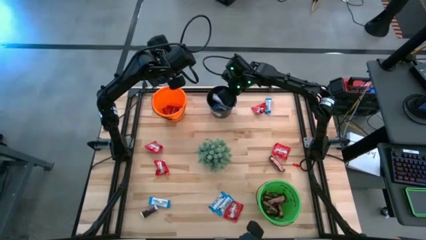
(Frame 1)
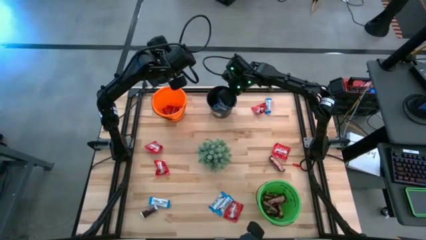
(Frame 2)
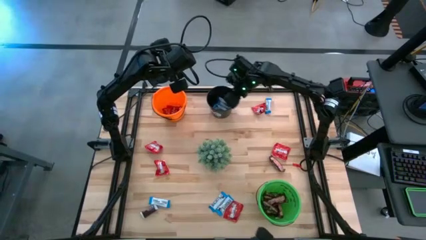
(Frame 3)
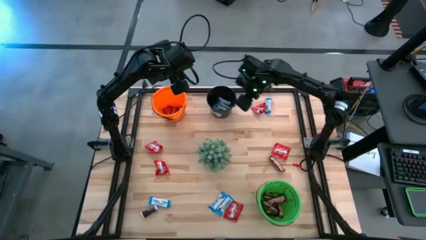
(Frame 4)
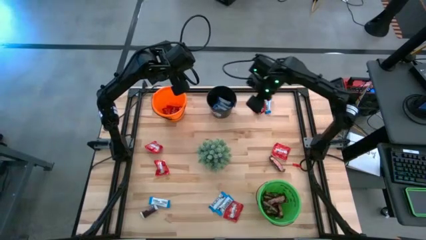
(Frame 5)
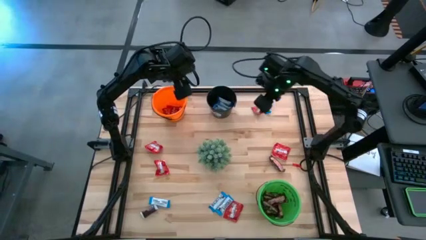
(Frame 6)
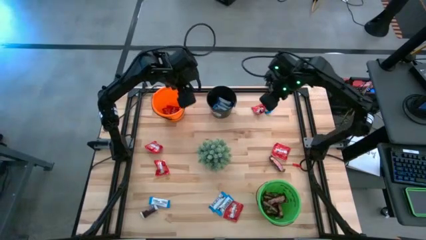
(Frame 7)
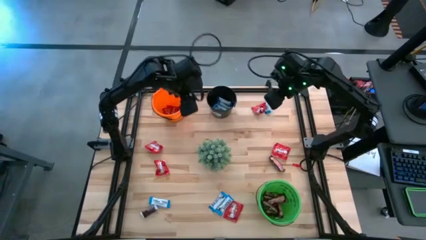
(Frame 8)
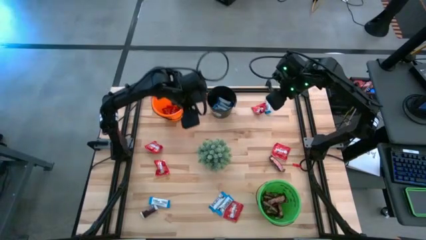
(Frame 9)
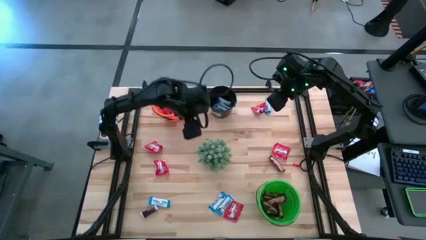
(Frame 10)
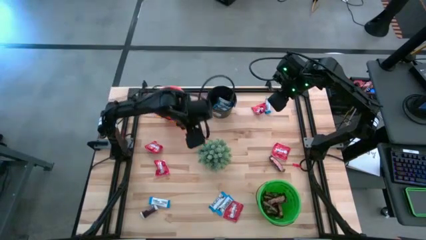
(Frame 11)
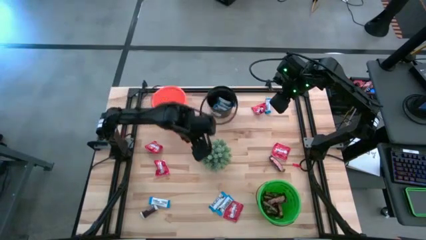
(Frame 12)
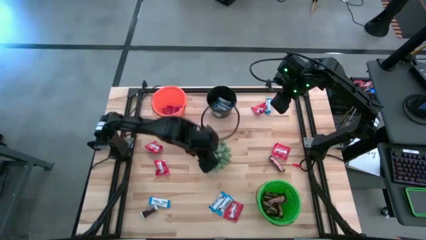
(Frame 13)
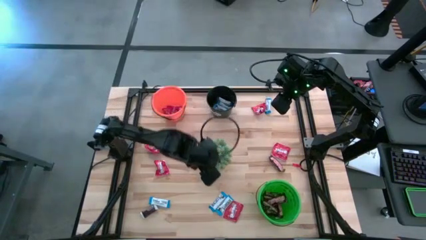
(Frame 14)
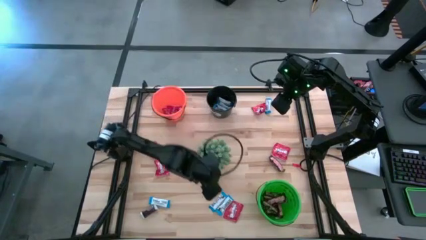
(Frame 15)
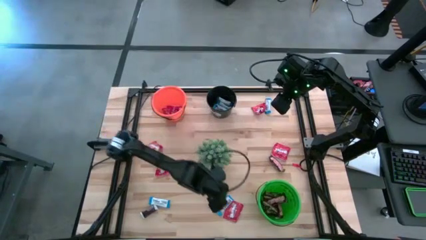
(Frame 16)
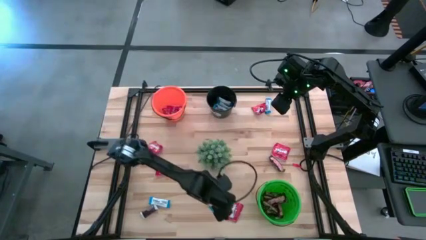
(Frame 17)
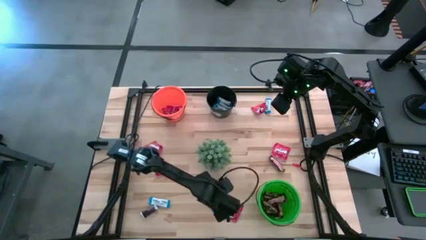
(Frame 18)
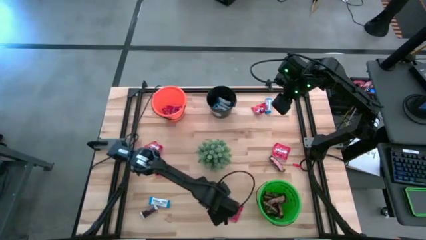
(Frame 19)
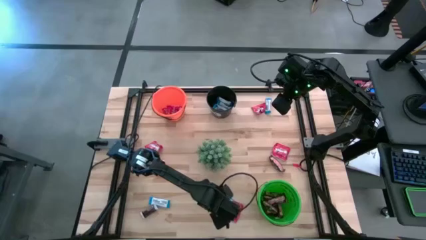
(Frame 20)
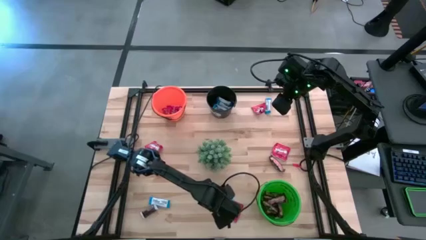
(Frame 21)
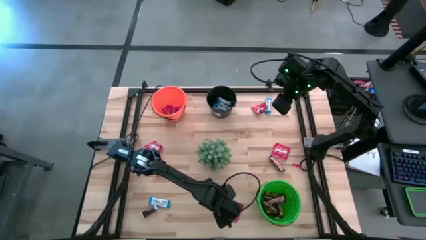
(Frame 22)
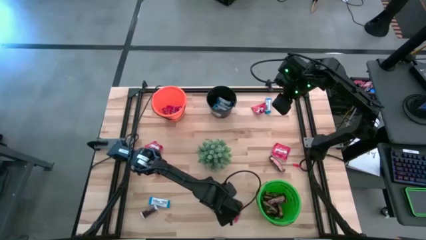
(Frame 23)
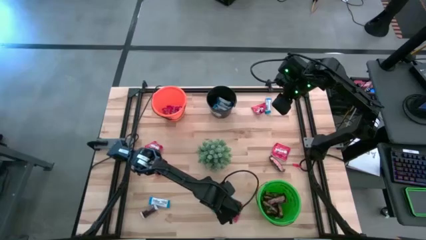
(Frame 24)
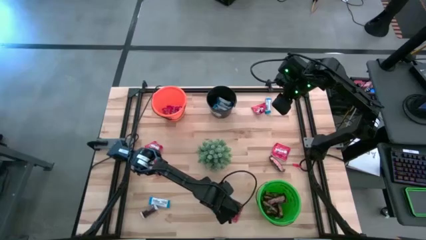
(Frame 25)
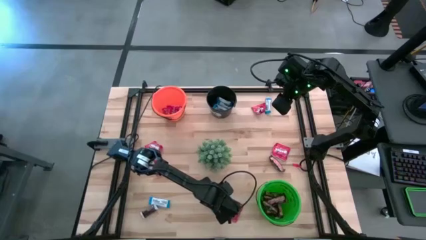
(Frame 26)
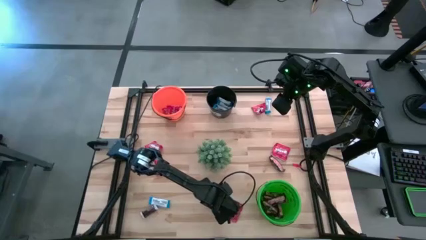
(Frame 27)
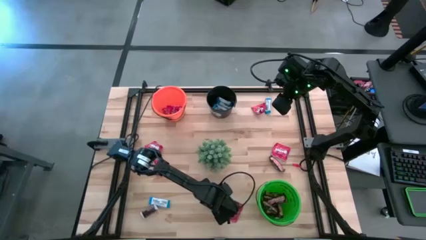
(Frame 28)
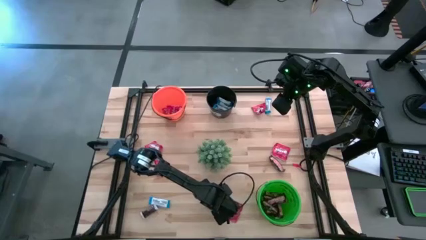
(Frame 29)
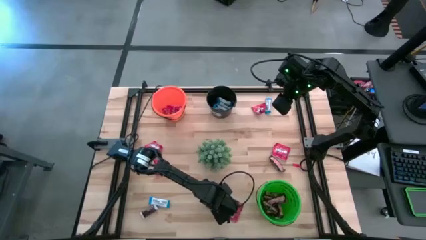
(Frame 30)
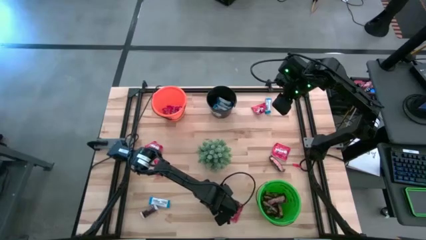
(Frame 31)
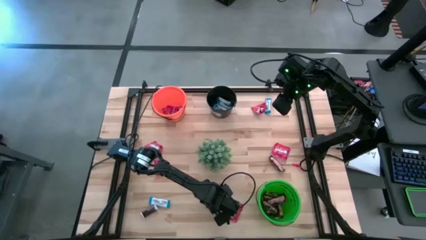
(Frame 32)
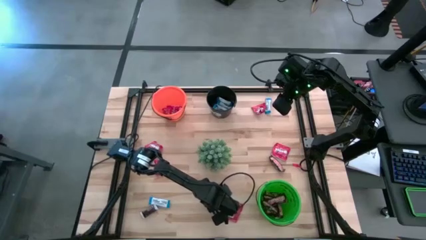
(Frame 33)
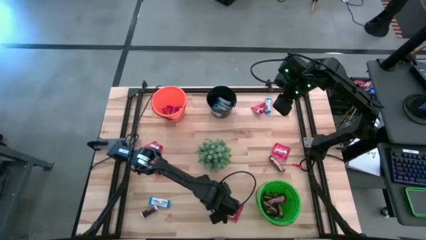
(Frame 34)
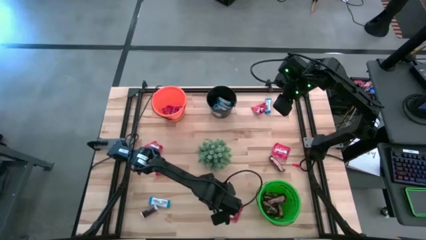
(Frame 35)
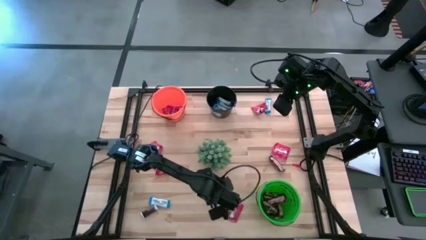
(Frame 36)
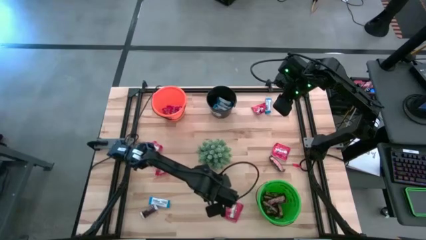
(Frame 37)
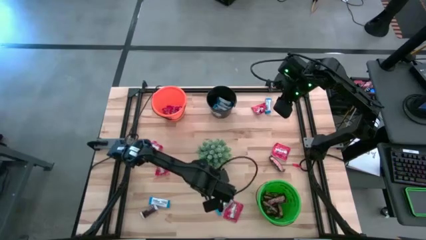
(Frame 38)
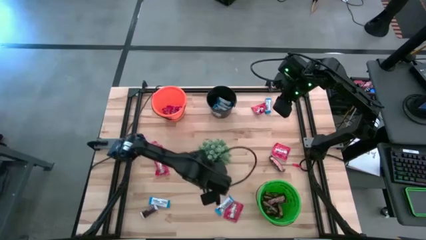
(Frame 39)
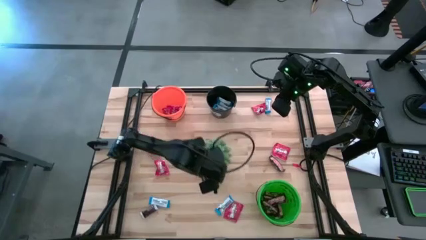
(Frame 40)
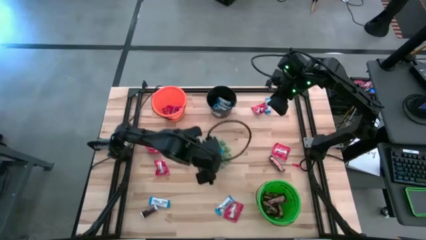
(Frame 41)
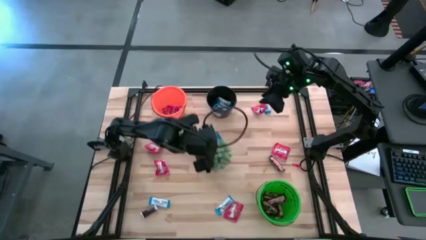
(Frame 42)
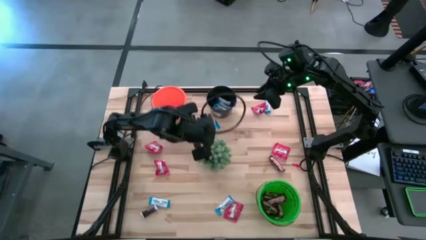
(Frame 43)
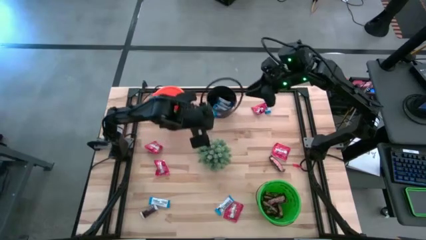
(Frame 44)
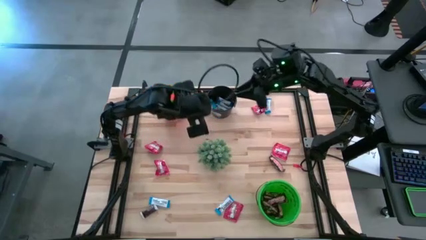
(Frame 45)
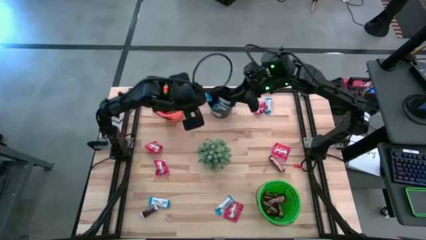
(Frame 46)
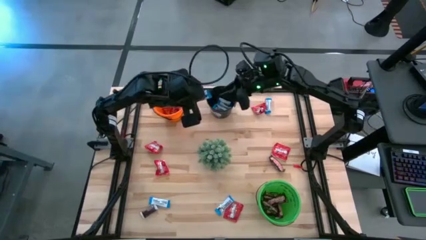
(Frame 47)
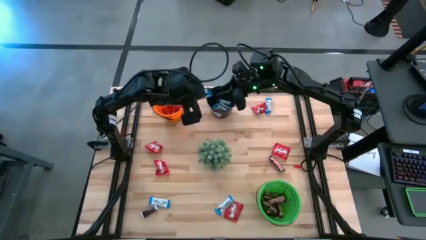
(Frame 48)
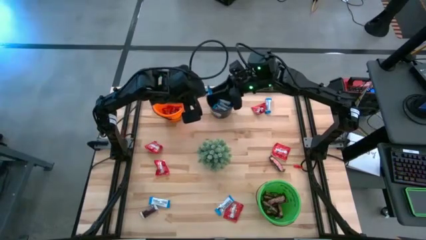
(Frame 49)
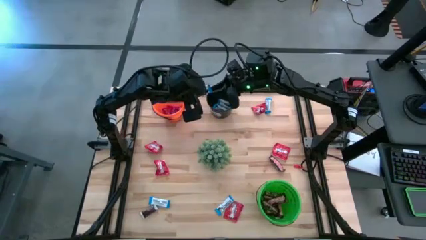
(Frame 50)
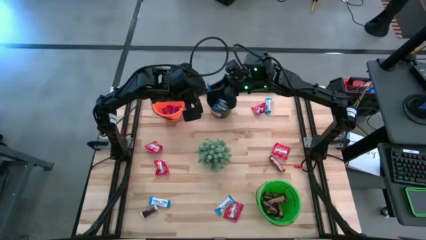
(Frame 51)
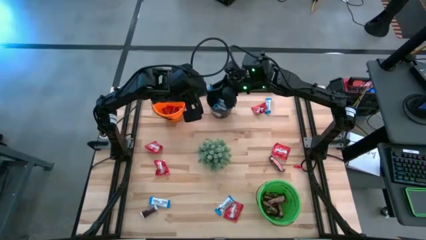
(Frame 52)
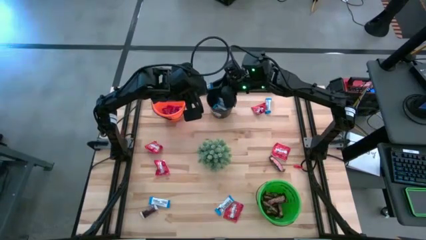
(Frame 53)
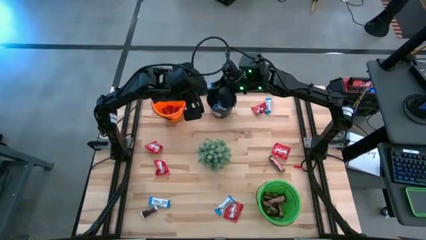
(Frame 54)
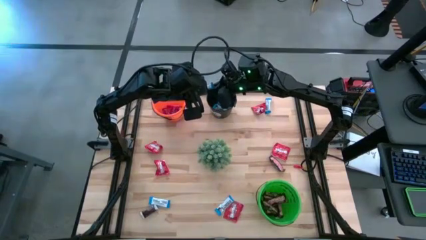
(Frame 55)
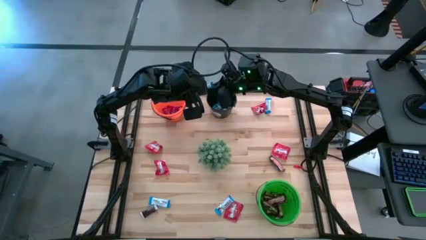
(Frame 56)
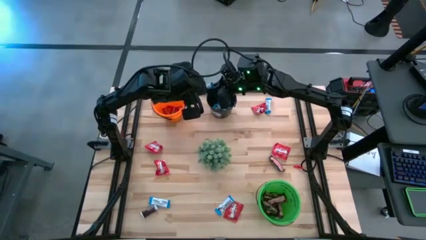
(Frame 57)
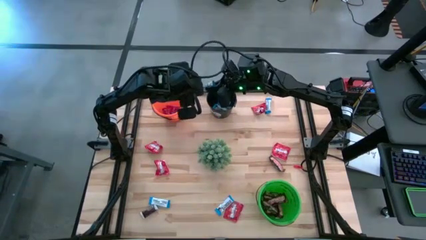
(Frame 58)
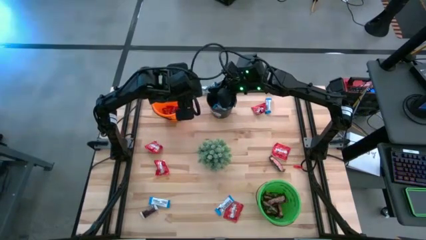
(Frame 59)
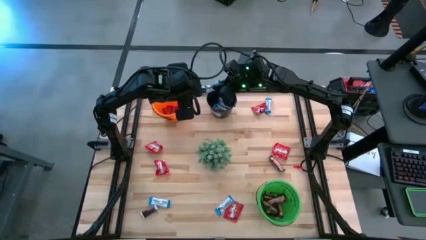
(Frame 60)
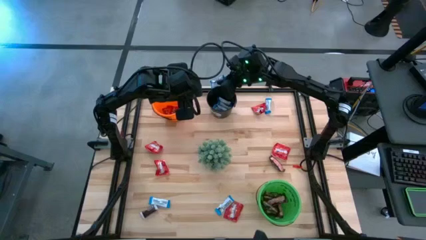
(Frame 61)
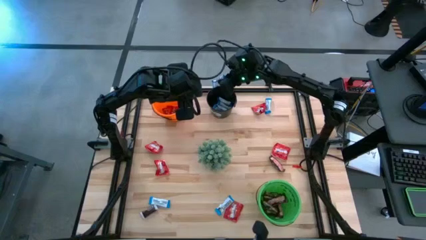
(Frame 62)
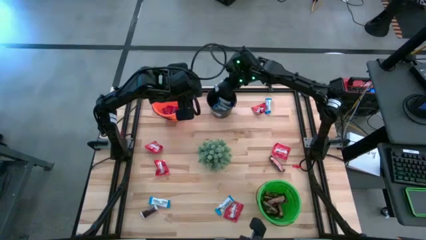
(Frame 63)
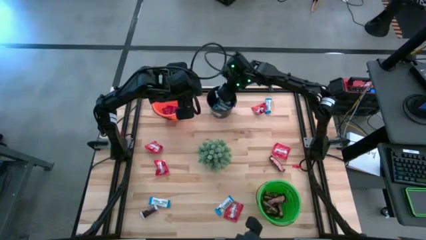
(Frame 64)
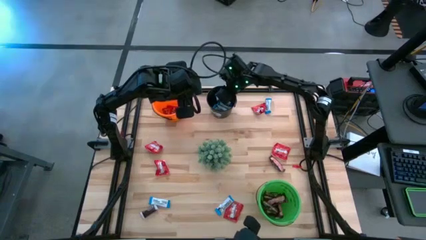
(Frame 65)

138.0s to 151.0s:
Task: Organize candy in baskets
Put the white chocolate bar into the black bucket
